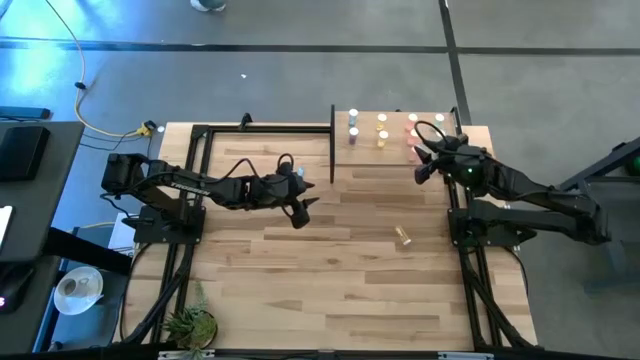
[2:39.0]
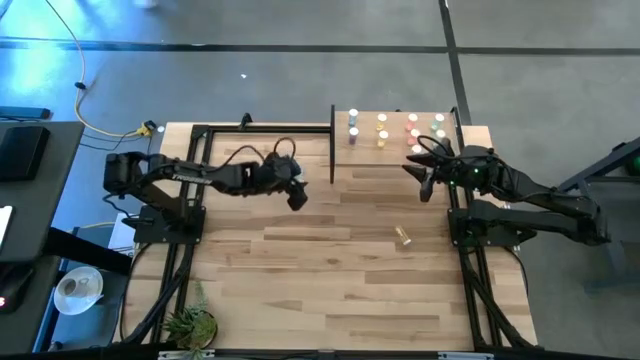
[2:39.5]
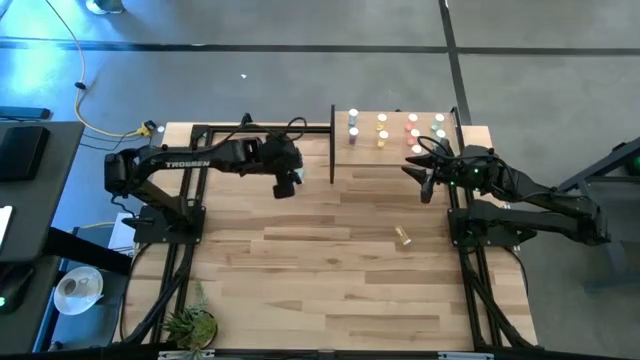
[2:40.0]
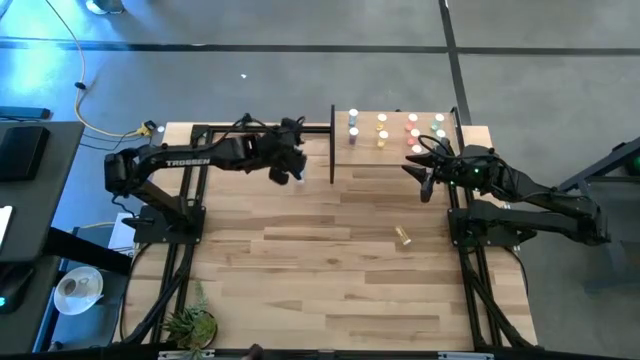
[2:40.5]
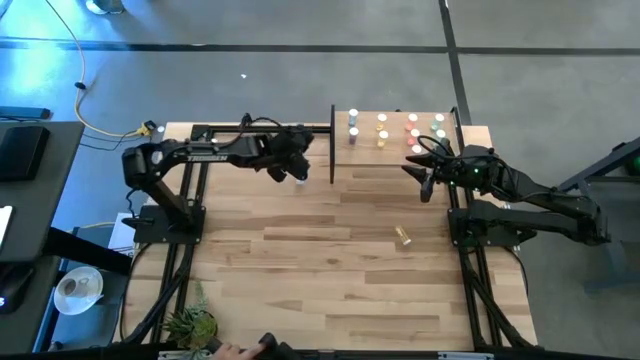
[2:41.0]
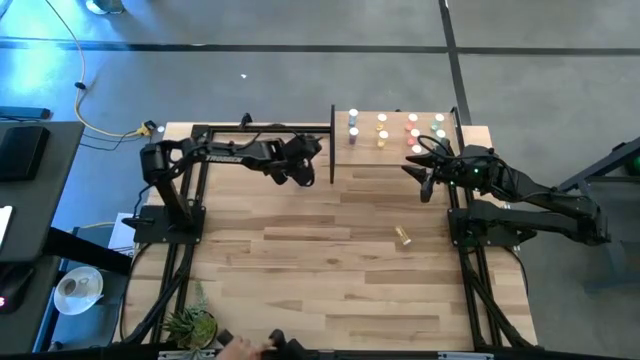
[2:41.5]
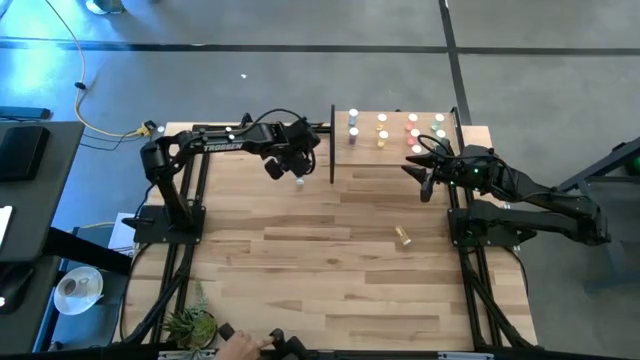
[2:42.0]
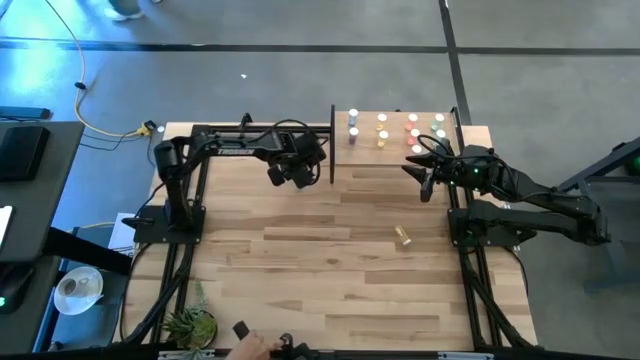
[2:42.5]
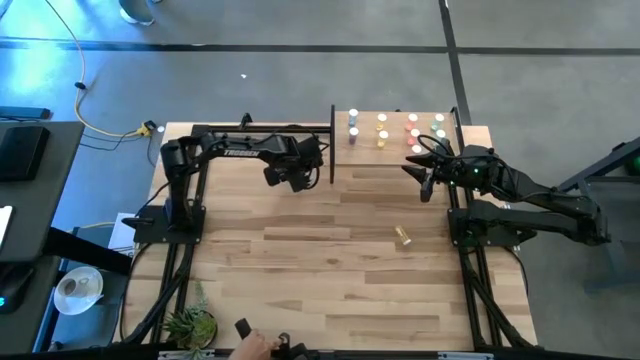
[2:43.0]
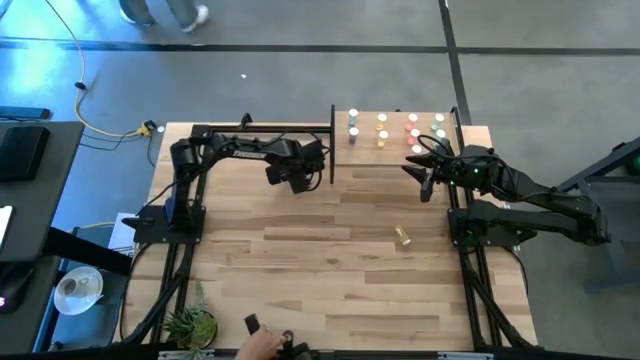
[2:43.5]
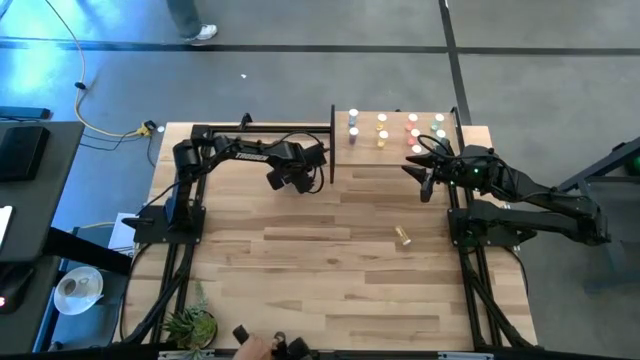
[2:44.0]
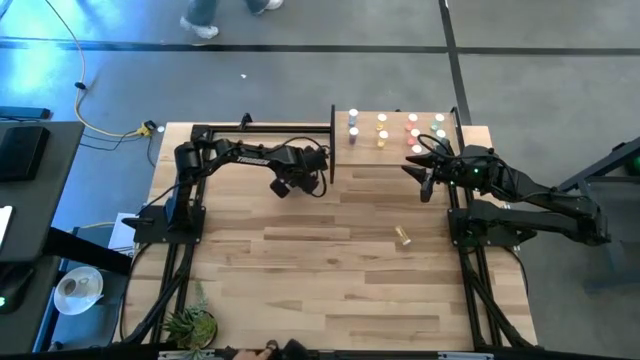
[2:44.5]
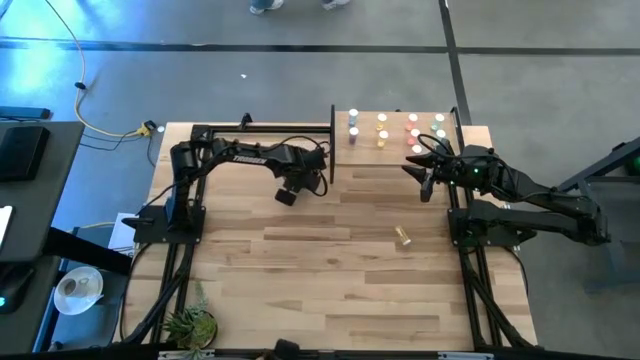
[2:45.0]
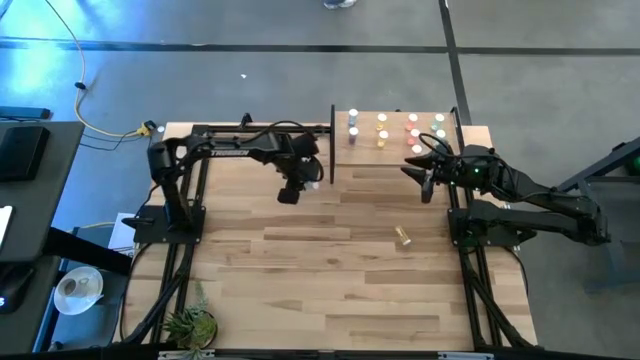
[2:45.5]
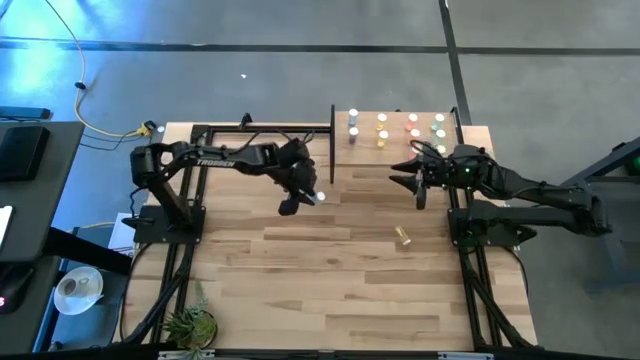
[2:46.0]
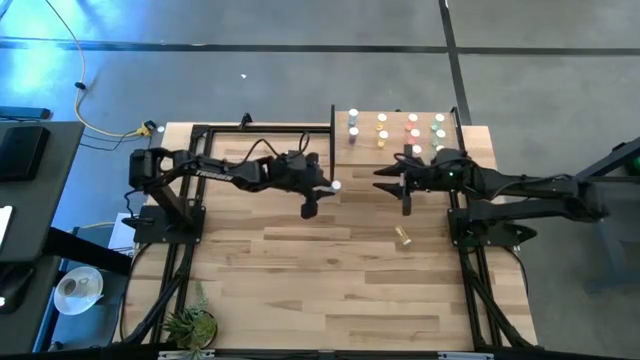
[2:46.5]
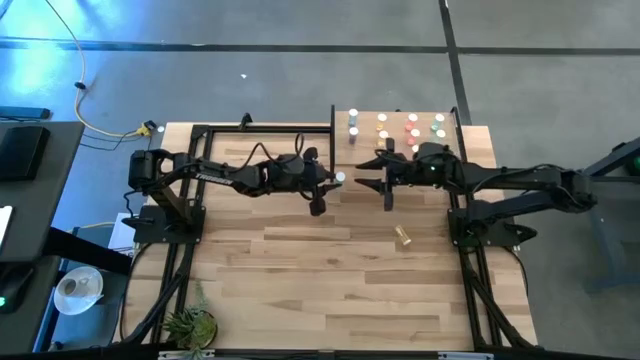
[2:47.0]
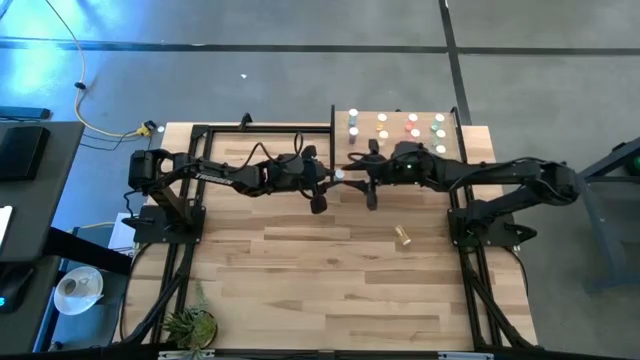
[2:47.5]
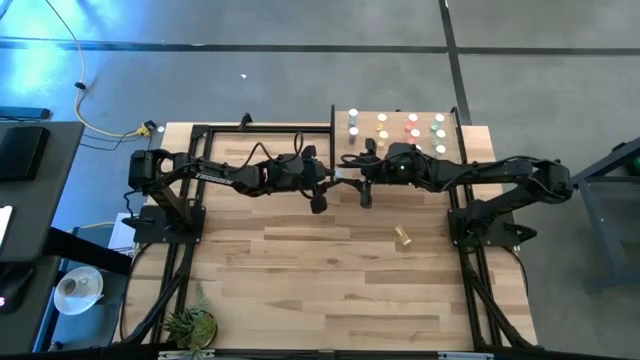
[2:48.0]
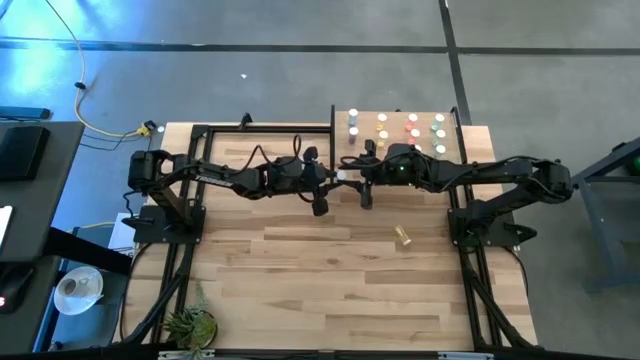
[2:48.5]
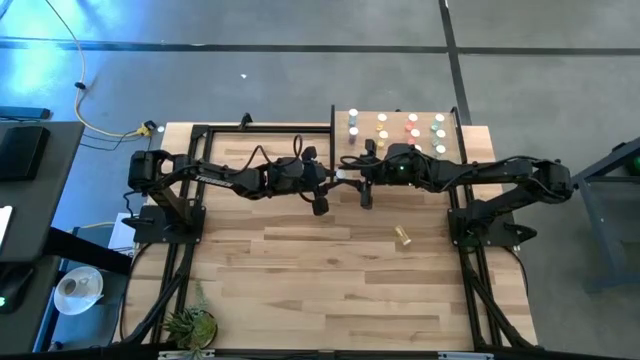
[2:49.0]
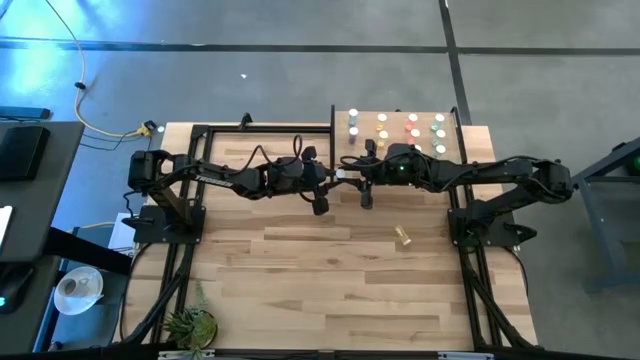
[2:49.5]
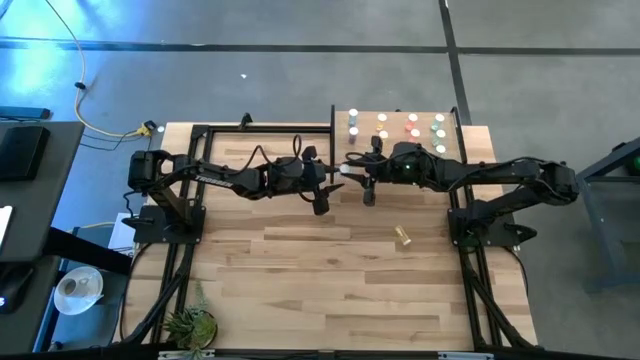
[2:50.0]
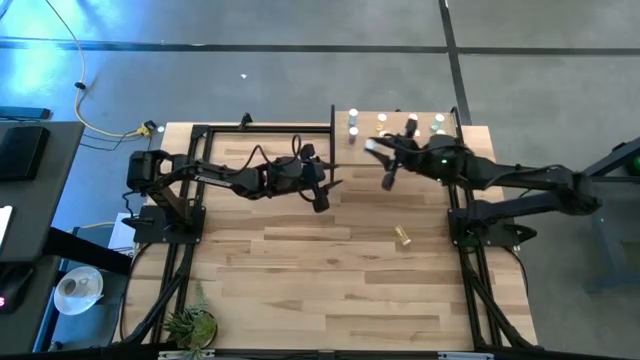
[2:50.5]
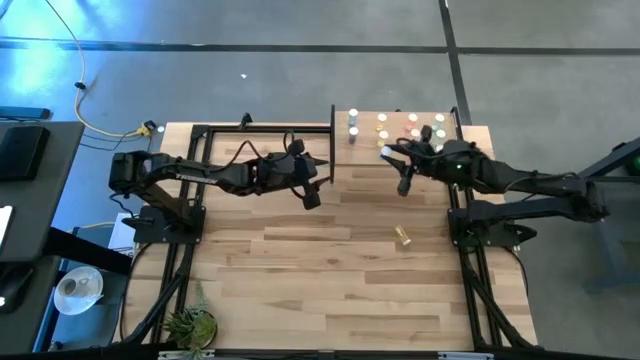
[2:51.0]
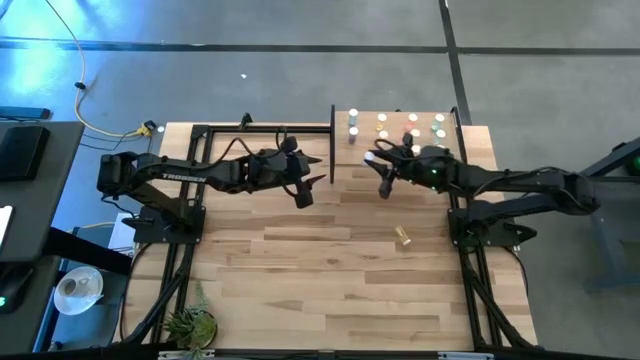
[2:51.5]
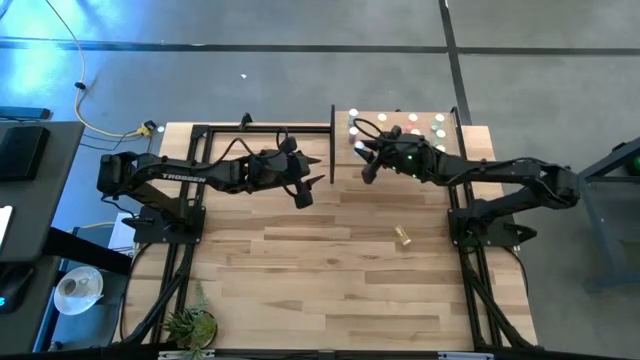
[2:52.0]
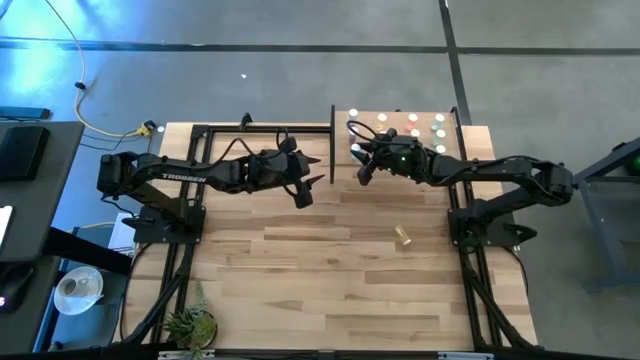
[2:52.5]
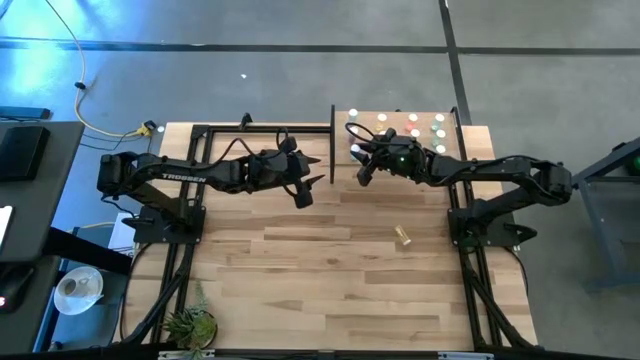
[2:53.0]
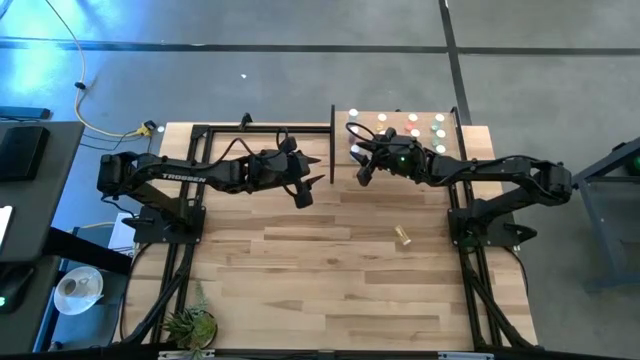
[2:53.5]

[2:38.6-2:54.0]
Task: Pick and place medicine bottles onto shelf by color
Put the blue medicine bottle aligned with the other blue medicine bottle on the shelf

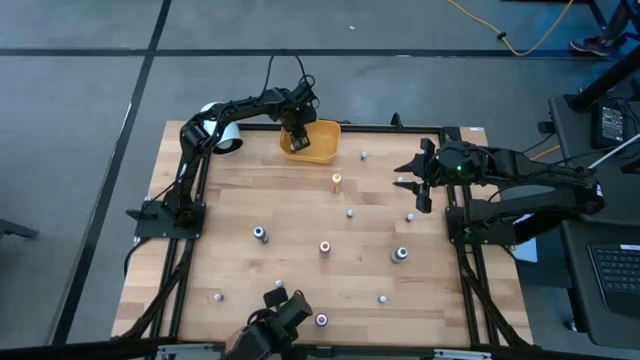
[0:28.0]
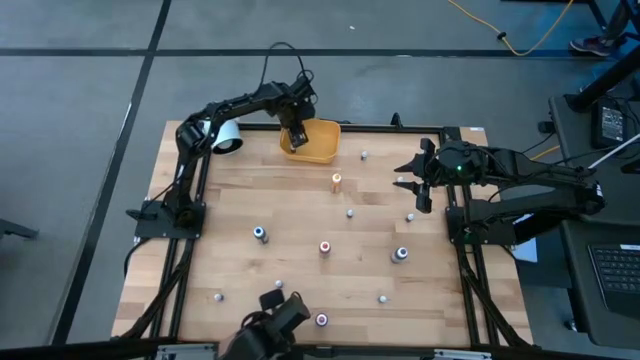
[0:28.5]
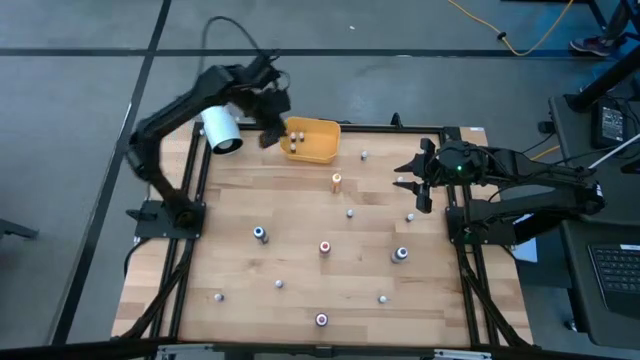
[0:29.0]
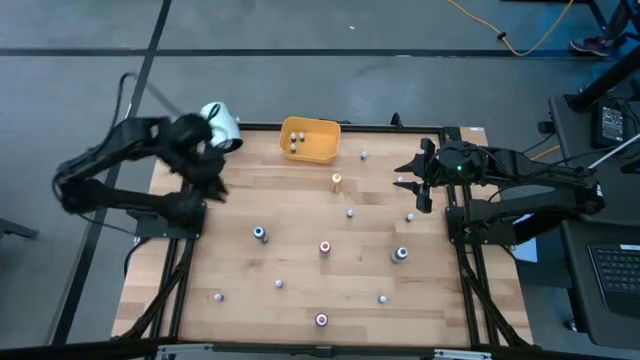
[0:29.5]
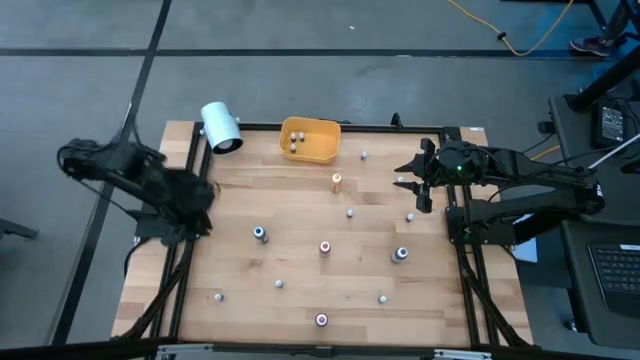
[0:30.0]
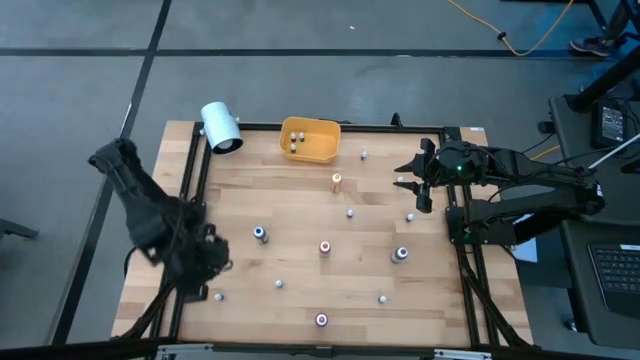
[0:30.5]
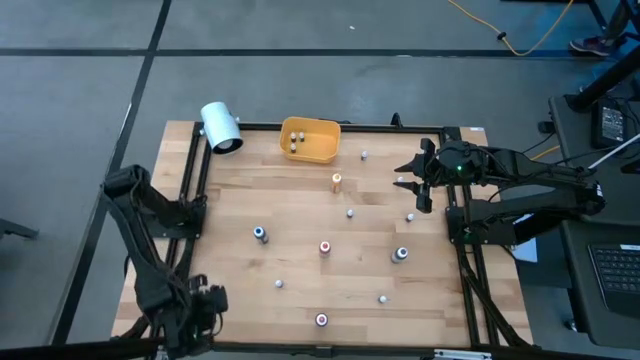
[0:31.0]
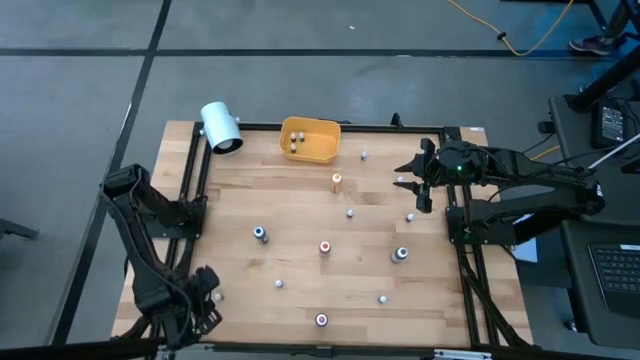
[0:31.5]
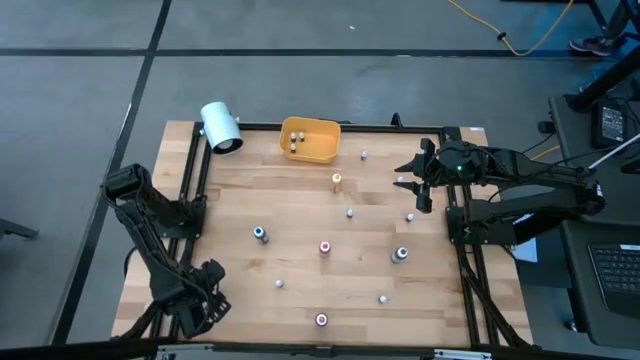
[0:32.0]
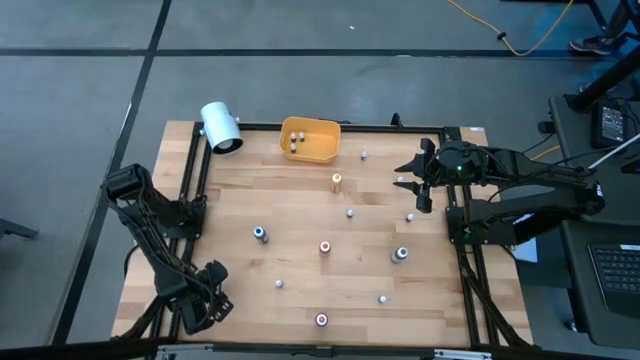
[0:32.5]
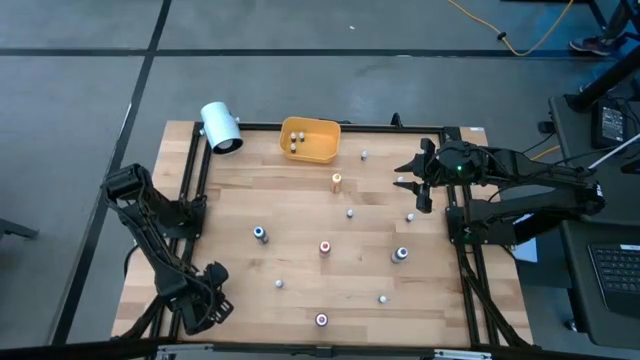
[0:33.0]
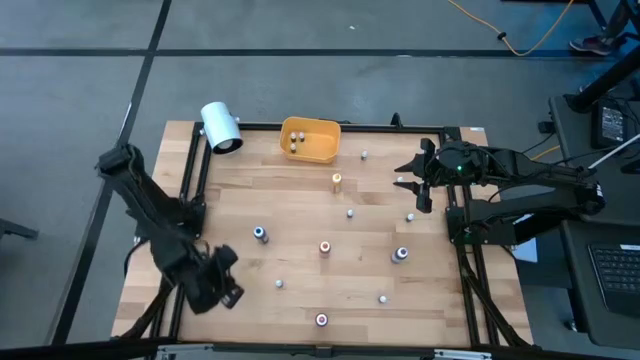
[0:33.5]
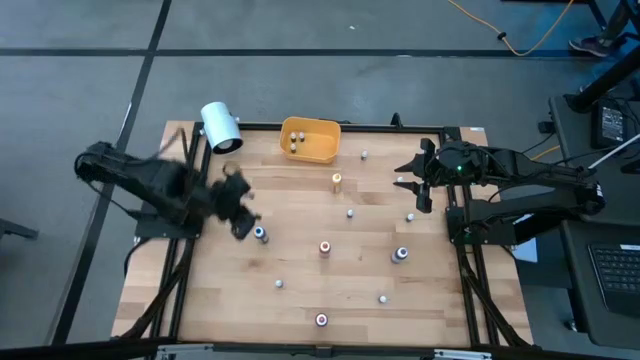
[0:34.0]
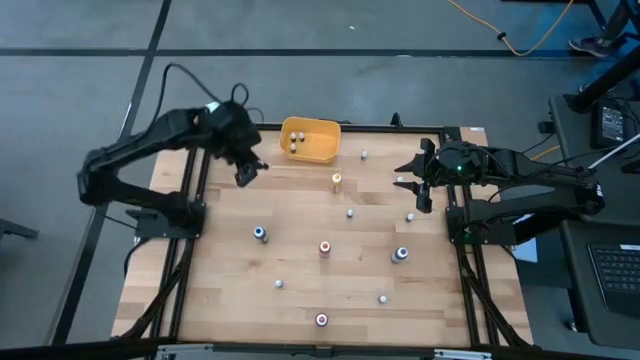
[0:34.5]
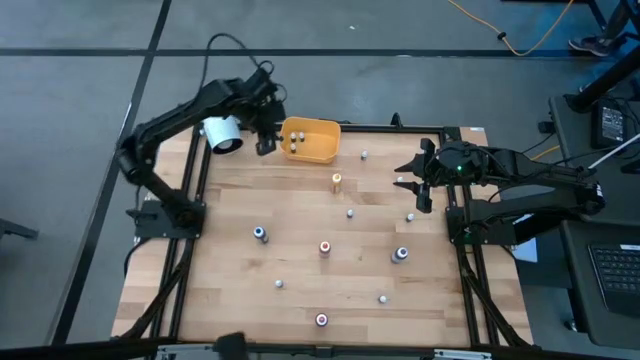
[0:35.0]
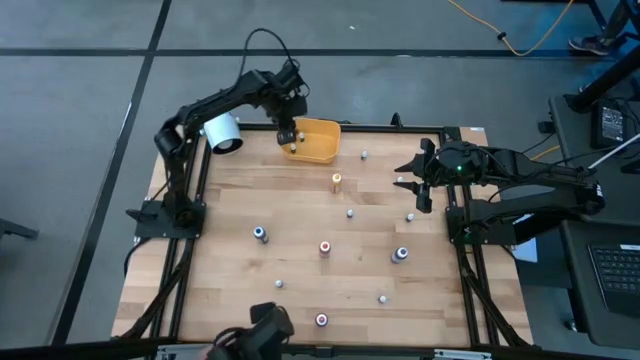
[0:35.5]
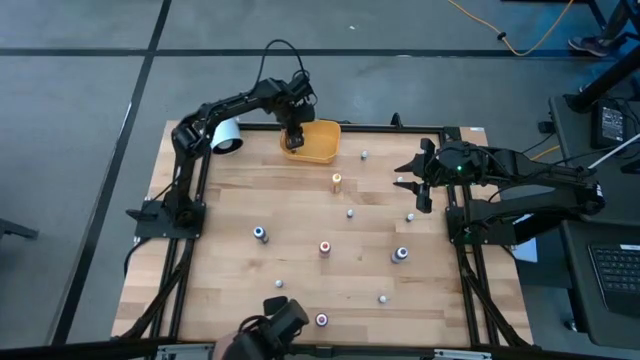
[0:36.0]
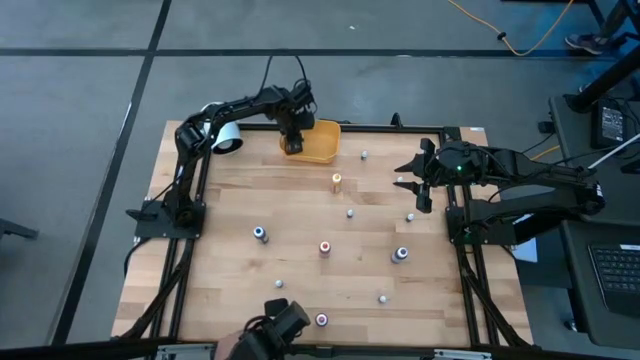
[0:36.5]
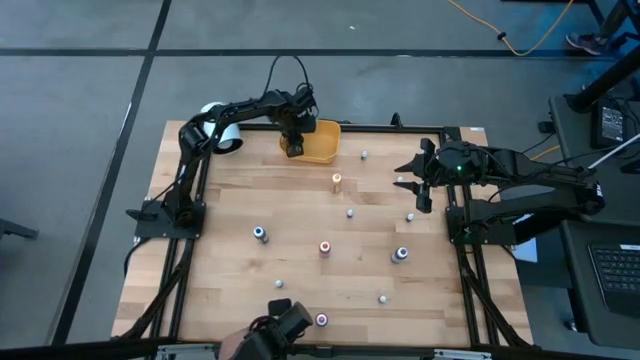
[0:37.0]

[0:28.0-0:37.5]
Task: Pick & Place food coloring
Put the black food coloring bottle into the yellow bin
